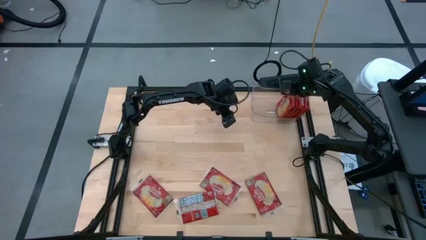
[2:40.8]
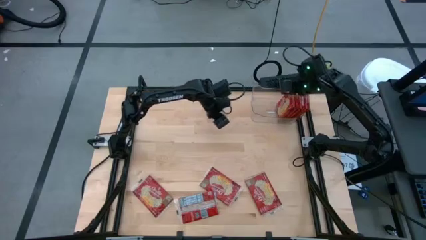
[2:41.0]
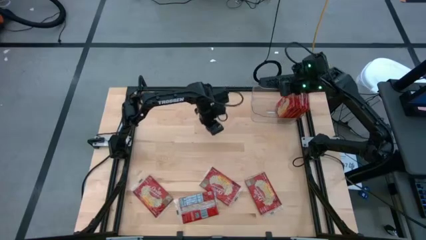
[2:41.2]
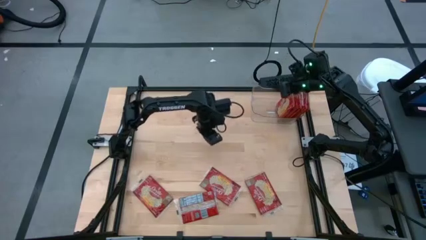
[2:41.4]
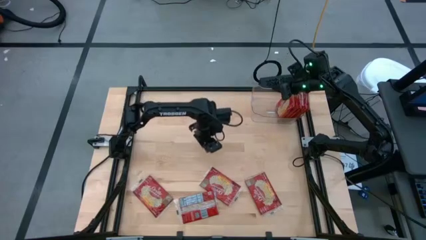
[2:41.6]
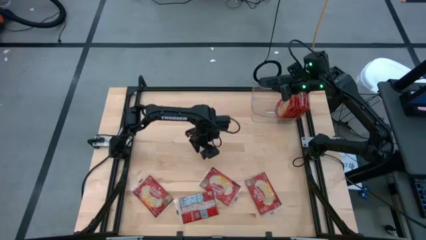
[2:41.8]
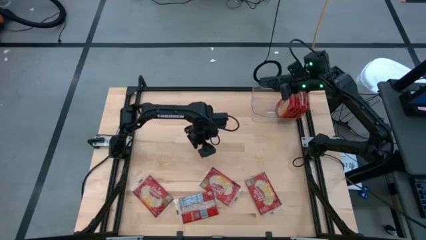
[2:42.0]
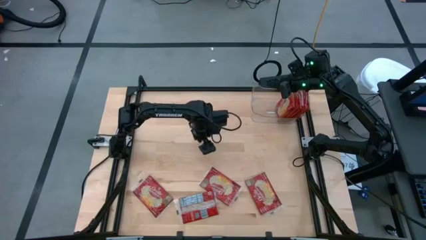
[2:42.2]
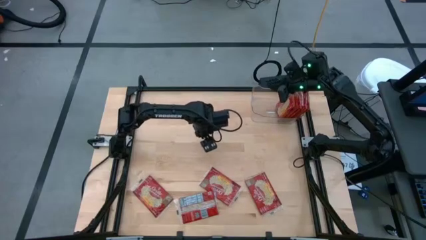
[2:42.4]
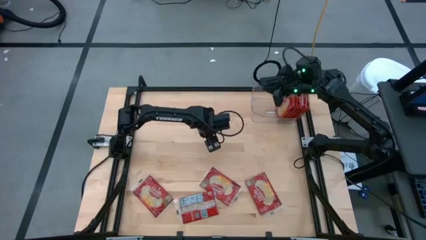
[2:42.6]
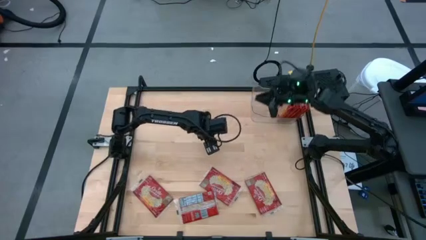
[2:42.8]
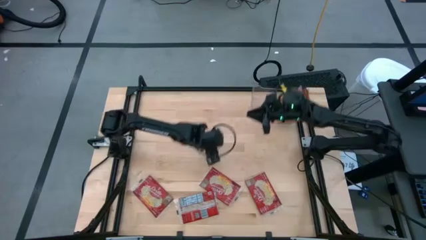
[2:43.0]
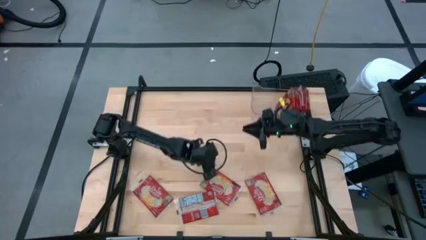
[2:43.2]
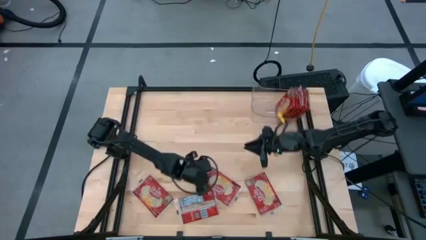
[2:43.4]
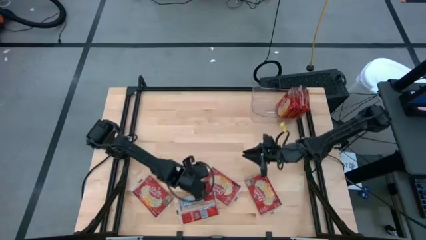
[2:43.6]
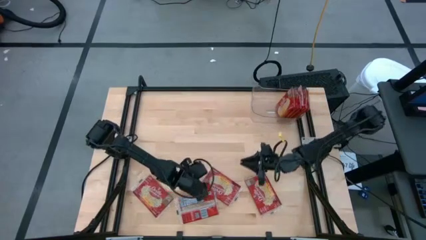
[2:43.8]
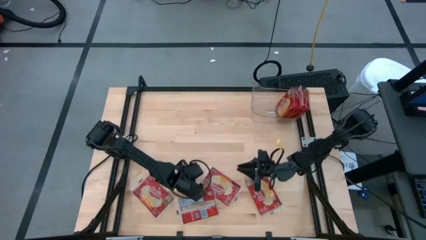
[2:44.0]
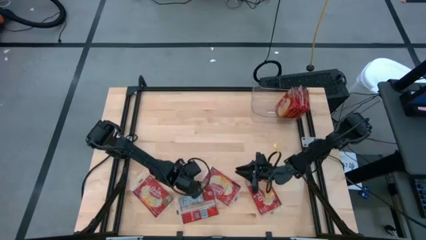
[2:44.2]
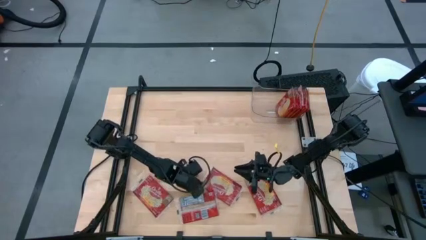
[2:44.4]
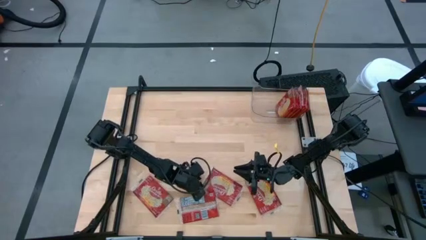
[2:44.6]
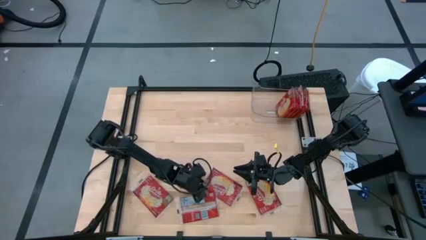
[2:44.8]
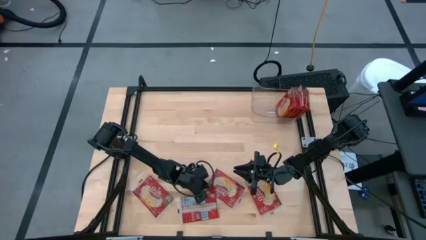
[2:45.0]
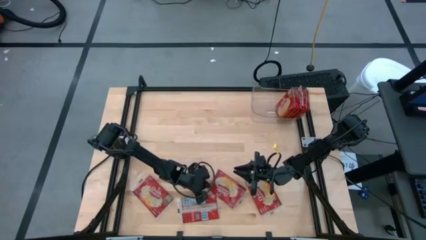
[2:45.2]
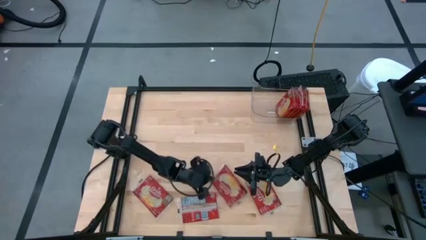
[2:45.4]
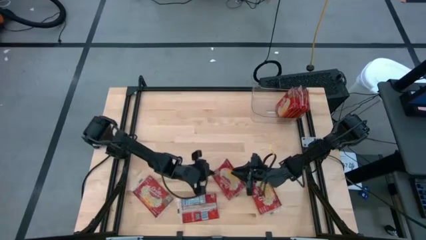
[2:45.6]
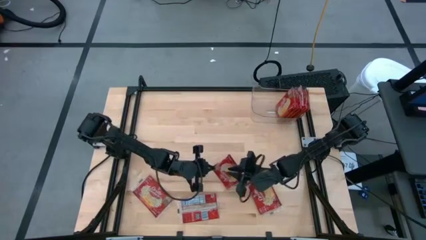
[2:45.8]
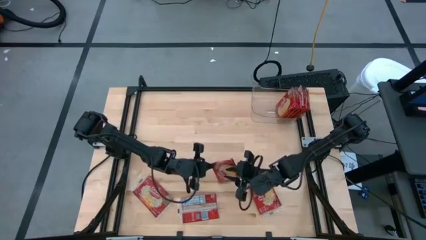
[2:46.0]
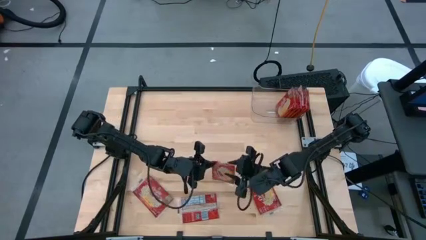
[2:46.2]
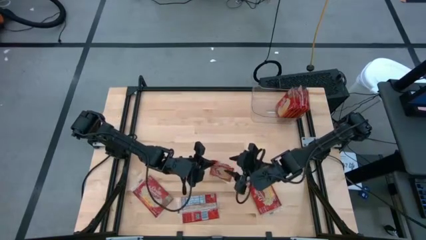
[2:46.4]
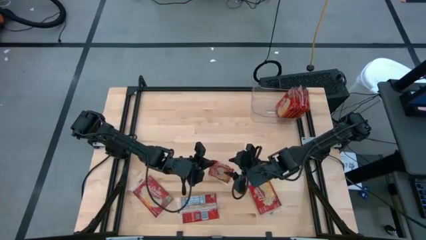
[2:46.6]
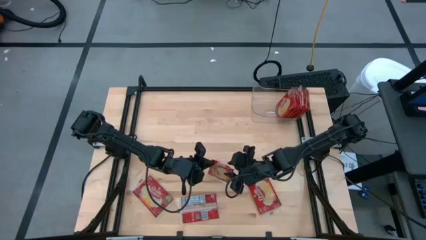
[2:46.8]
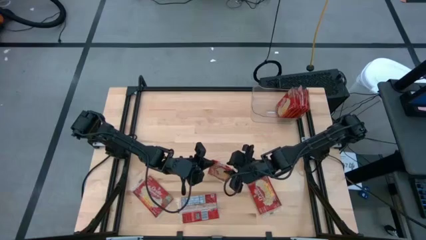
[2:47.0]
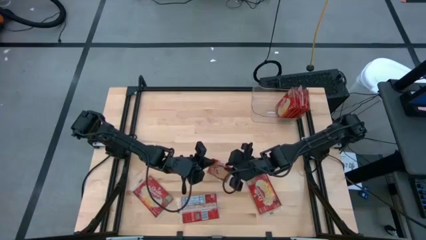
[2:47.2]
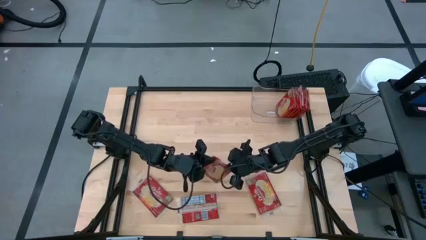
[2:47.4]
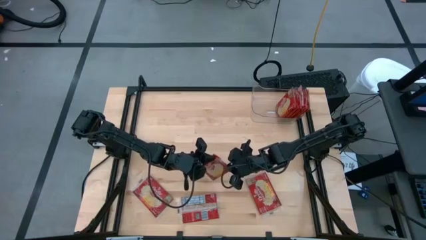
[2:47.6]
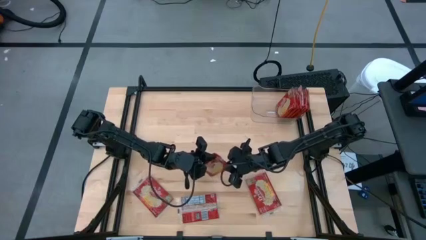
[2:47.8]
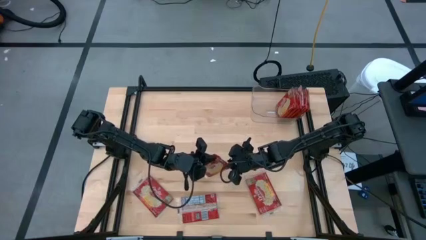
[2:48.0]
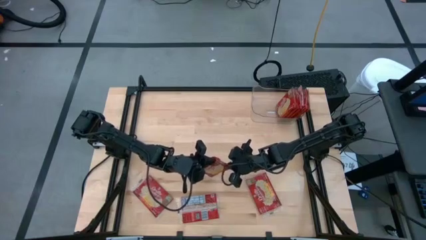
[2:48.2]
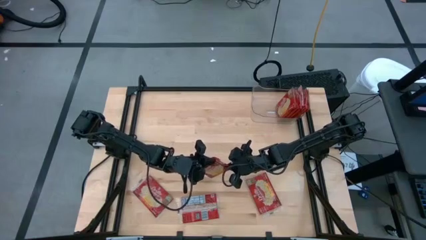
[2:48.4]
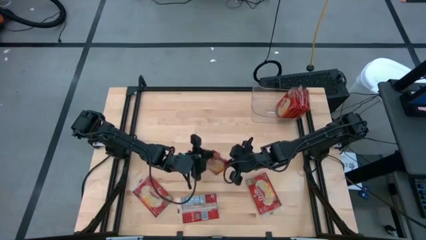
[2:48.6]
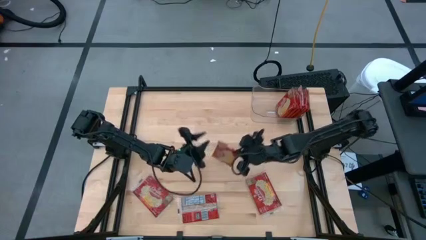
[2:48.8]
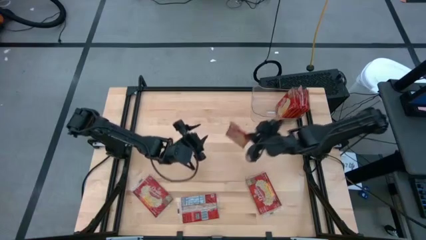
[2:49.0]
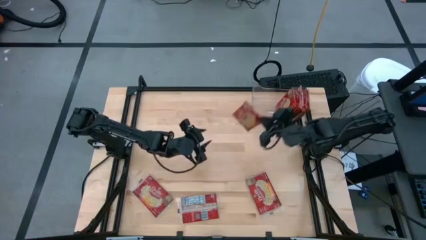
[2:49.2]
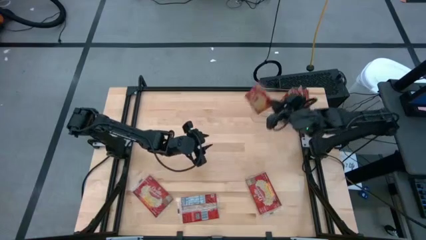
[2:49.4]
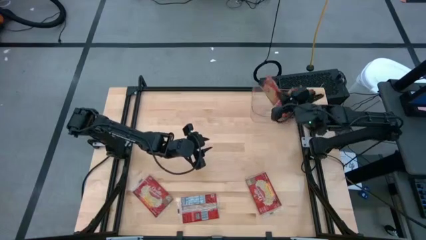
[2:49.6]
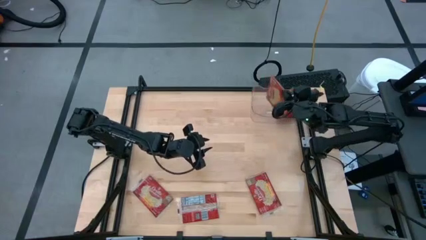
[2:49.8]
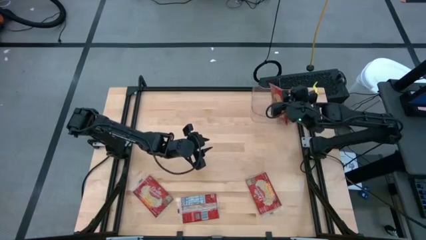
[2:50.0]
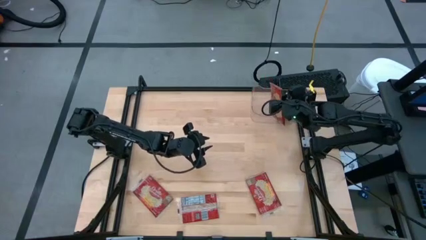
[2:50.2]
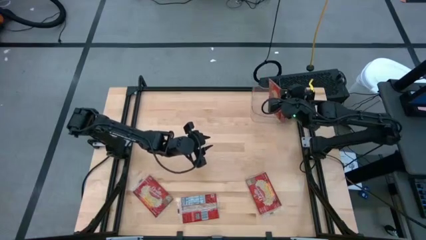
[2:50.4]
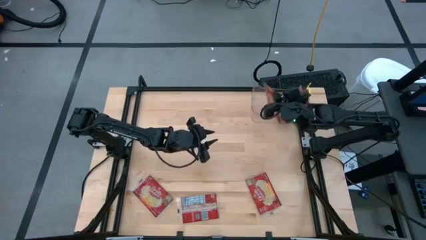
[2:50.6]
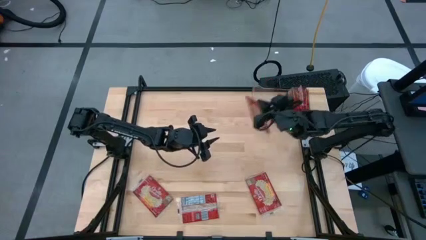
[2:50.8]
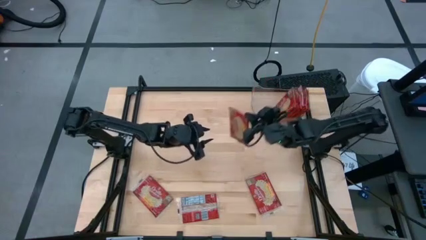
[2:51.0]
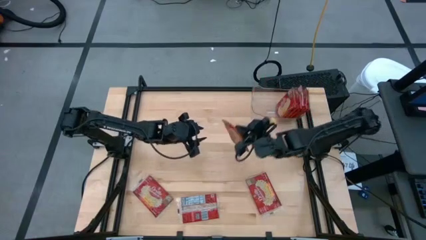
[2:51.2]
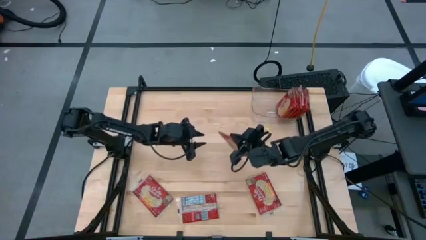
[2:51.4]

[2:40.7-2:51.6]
Task: Sort popcorn bags into baskets
Put the red popcorn bag into the transparent bin

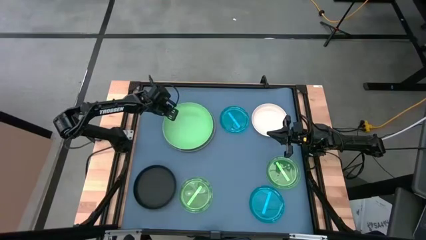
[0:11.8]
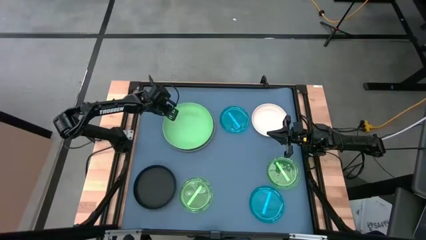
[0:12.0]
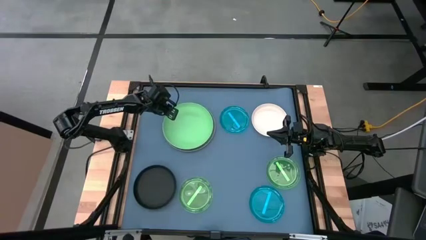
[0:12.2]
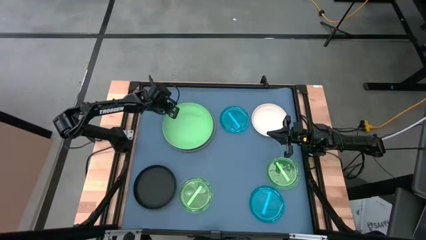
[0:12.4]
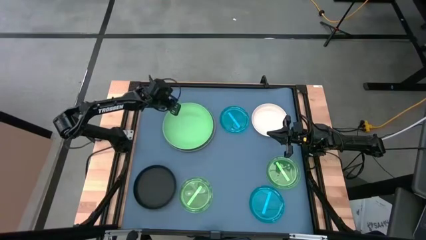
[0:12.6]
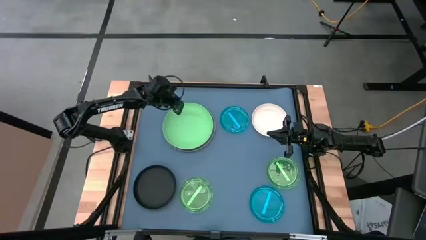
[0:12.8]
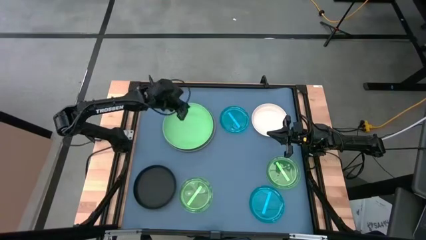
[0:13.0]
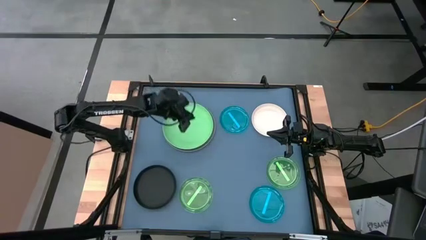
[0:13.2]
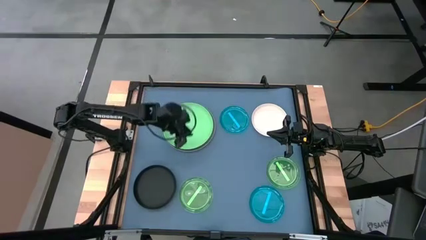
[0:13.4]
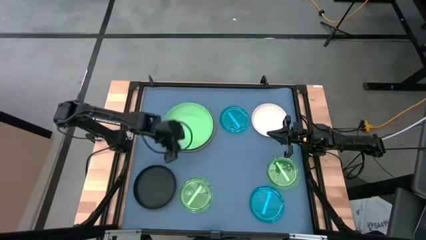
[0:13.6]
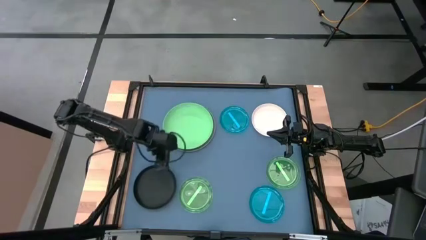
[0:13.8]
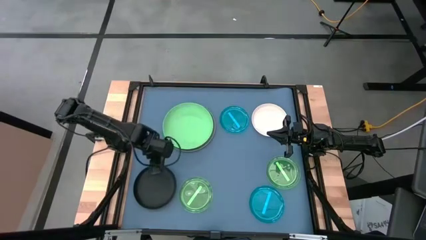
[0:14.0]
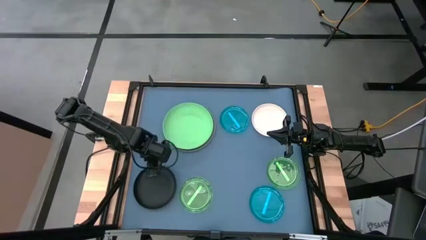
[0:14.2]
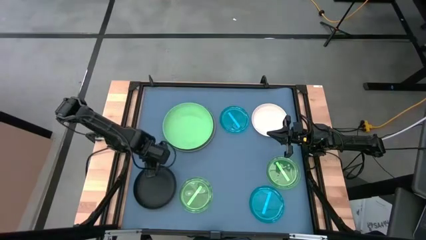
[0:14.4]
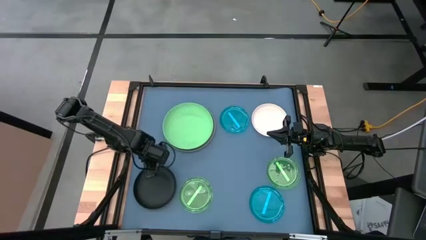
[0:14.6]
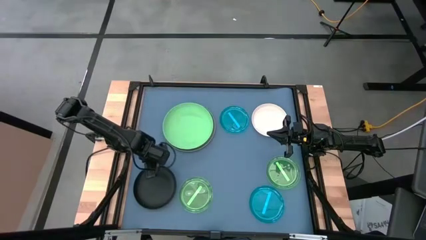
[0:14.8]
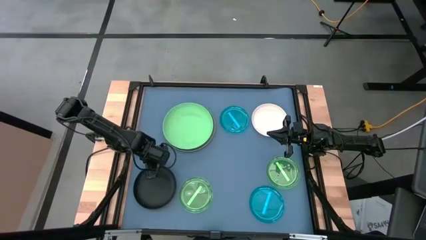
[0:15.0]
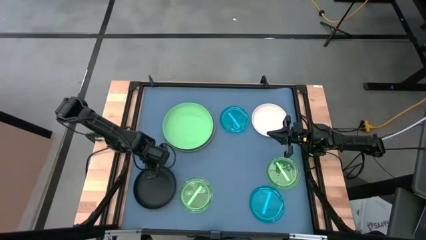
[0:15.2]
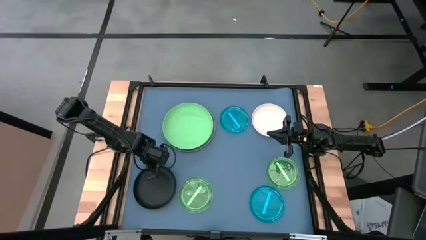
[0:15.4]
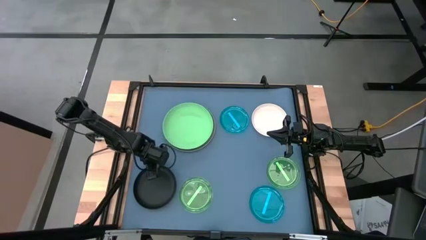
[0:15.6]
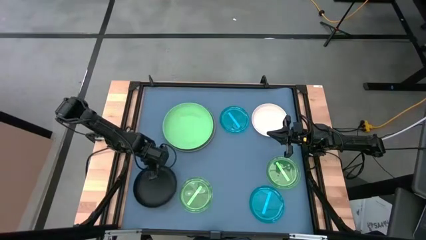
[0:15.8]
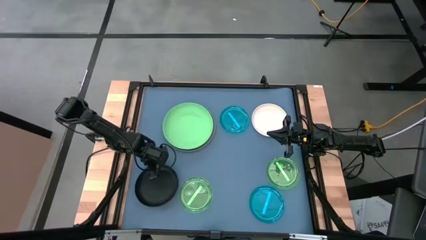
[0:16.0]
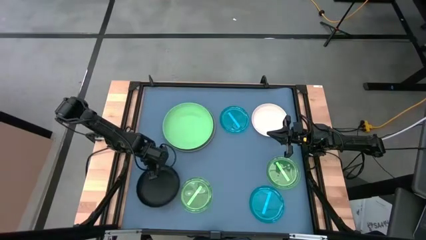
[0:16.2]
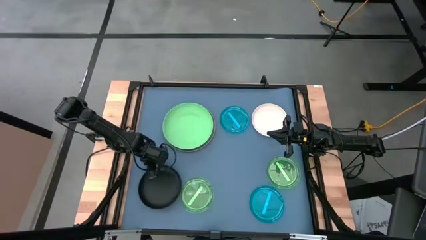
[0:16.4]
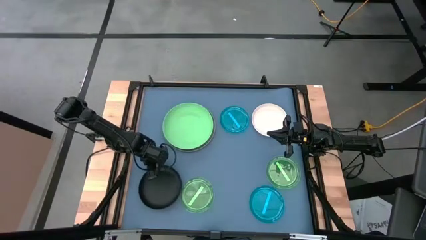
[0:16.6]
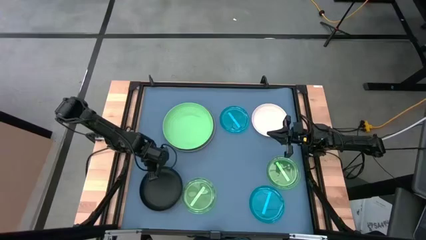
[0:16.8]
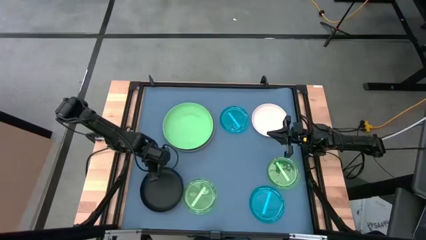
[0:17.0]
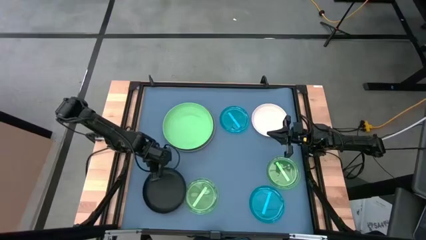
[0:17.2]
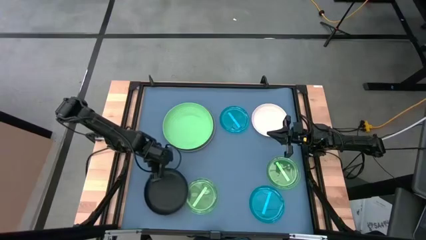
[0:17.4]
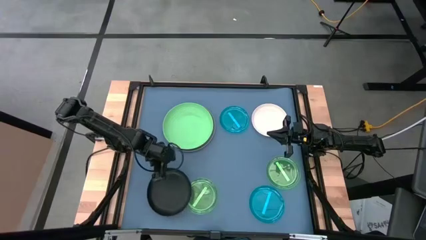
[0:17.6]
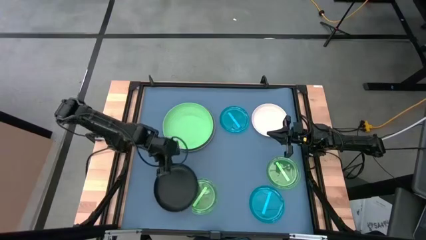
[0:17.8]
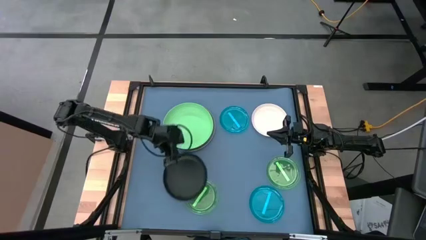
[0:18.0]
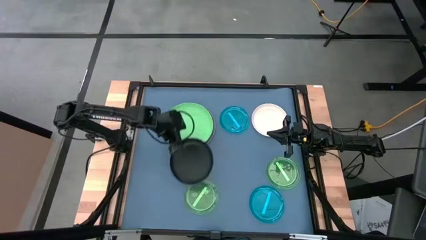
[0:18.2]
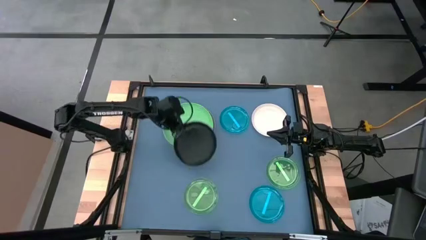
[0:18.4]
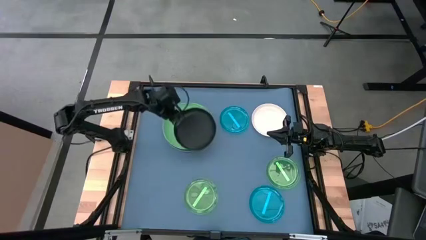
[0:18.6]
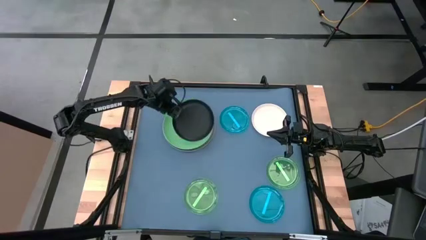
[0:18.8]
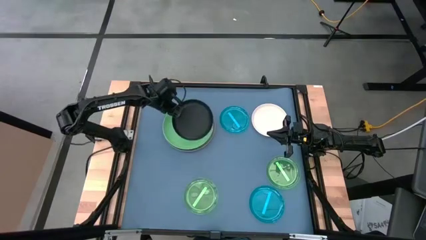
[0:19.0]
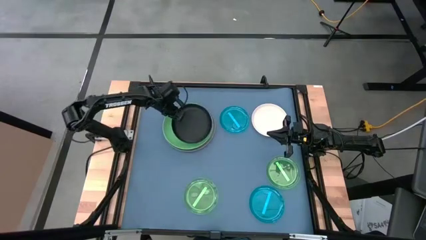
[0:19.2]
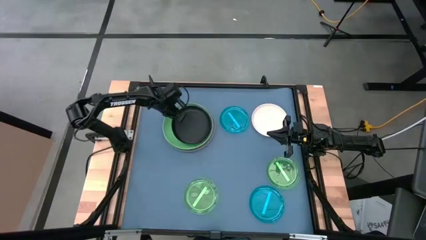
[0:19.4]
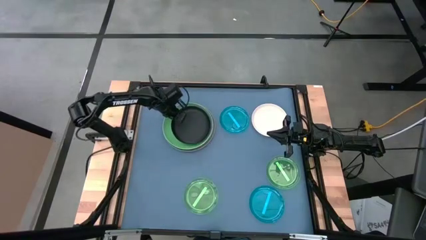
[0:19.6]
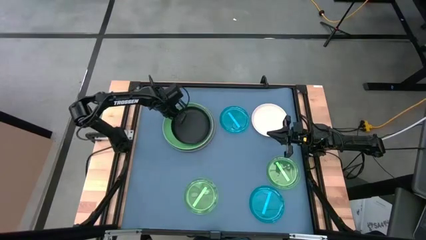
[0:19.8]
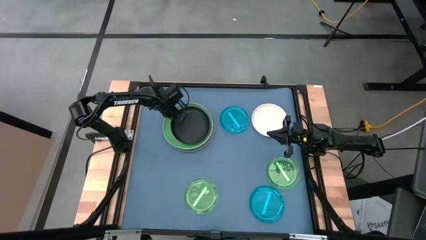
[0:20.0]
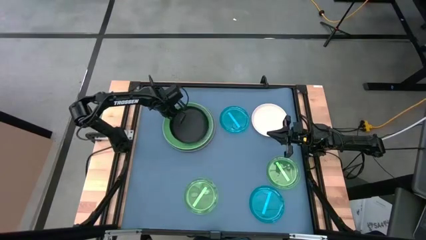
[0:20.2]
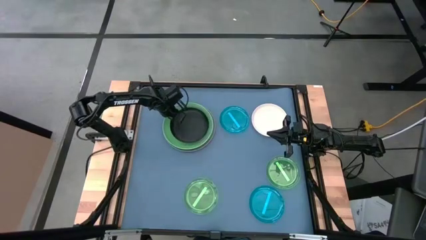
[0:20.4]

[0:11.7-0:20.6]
Task: Stack plastic plates
Stack the black plate on top of the green plate
